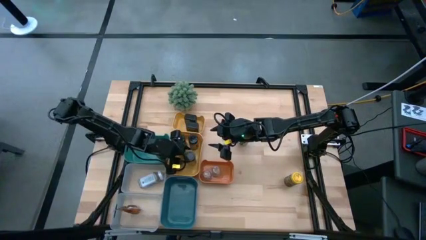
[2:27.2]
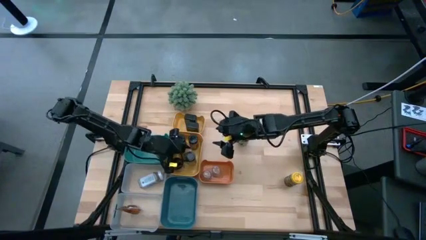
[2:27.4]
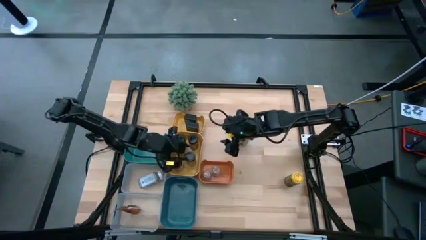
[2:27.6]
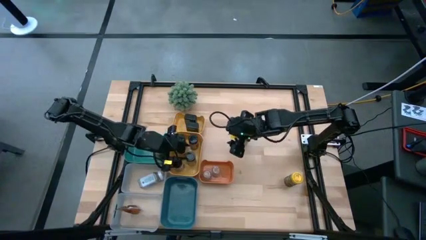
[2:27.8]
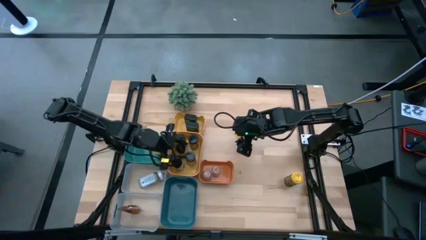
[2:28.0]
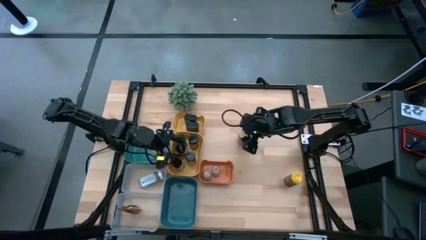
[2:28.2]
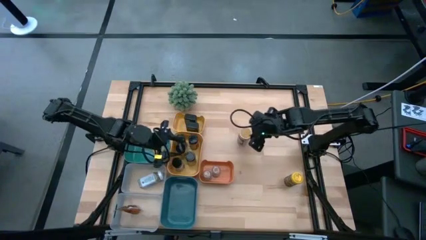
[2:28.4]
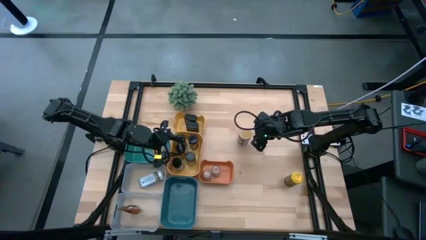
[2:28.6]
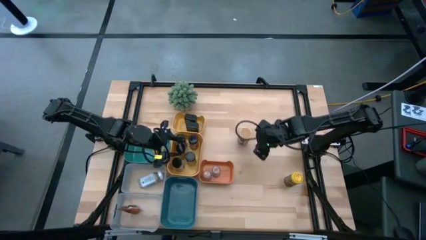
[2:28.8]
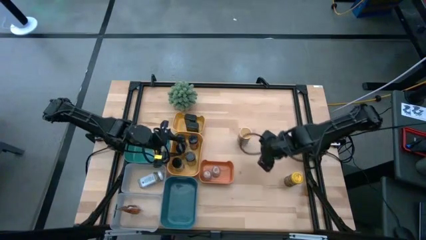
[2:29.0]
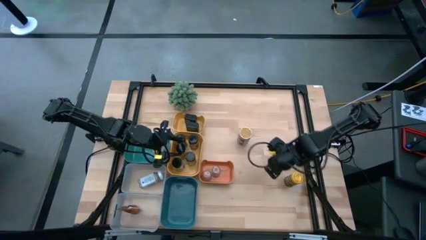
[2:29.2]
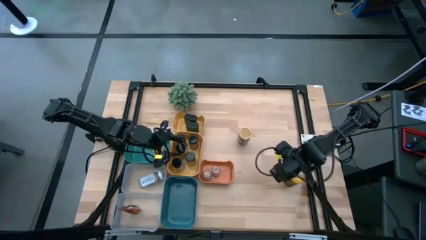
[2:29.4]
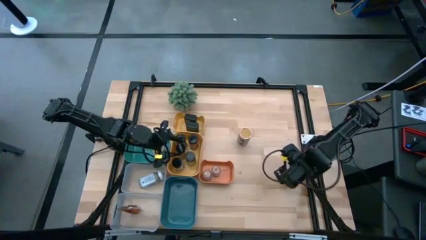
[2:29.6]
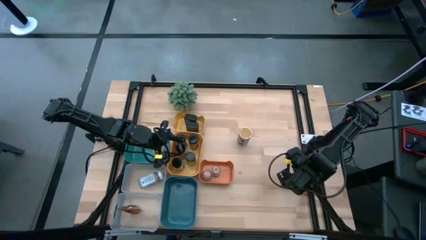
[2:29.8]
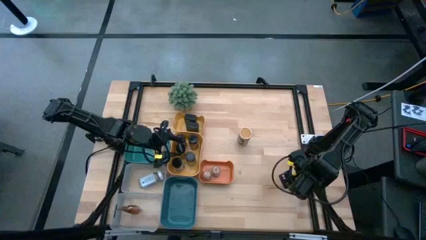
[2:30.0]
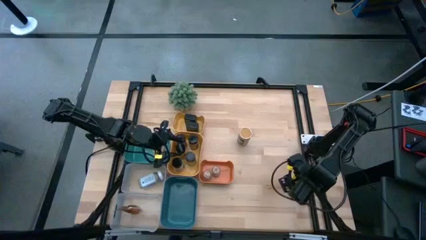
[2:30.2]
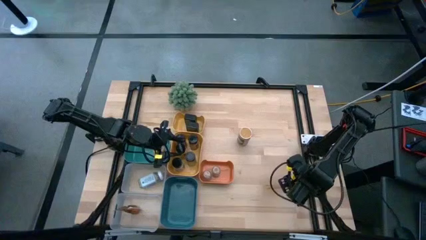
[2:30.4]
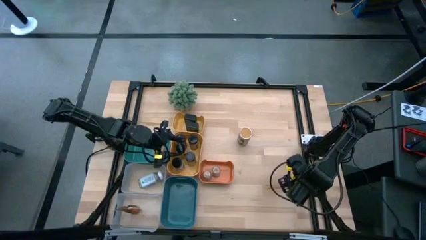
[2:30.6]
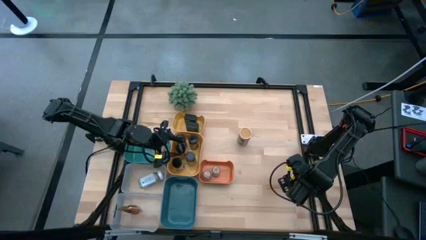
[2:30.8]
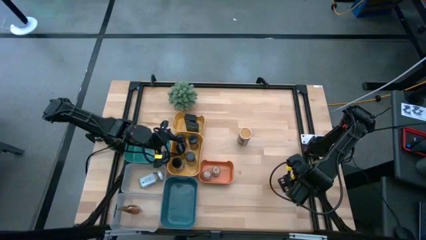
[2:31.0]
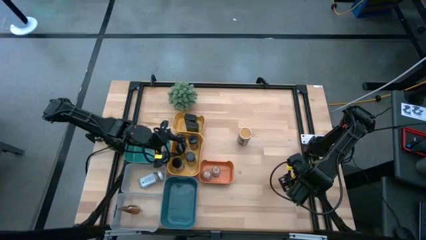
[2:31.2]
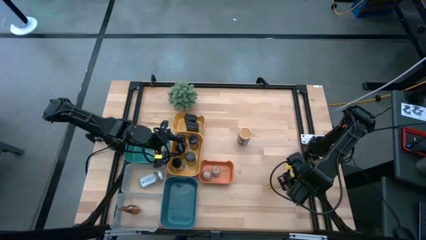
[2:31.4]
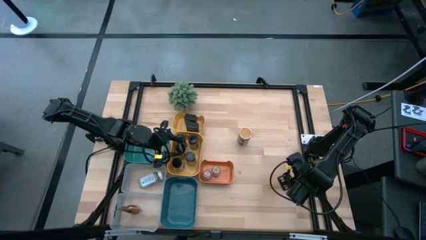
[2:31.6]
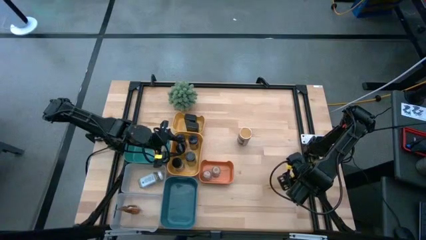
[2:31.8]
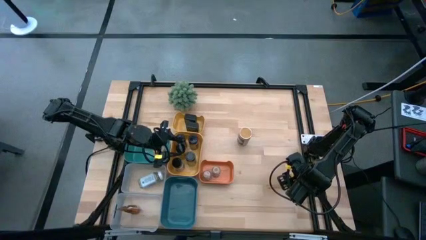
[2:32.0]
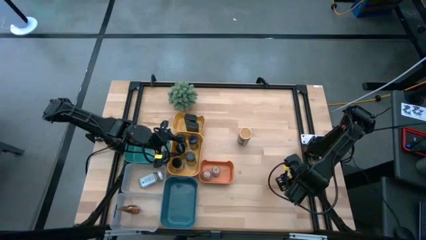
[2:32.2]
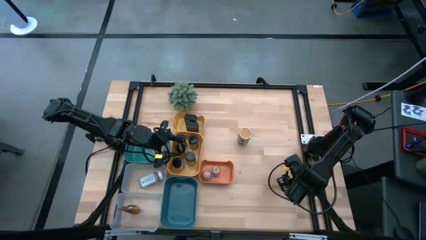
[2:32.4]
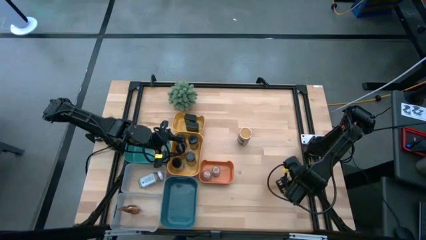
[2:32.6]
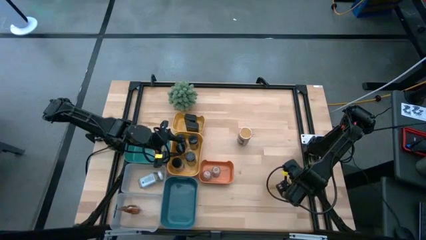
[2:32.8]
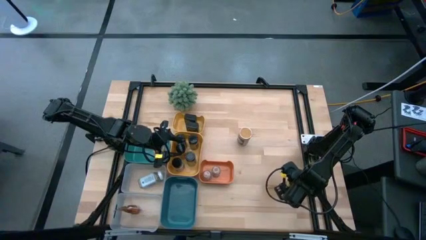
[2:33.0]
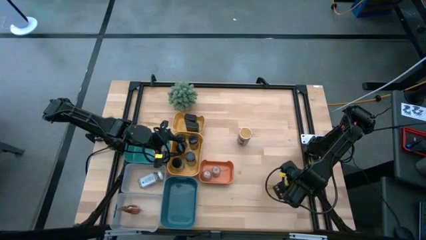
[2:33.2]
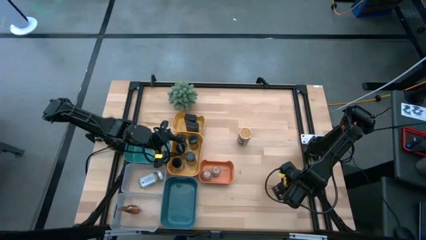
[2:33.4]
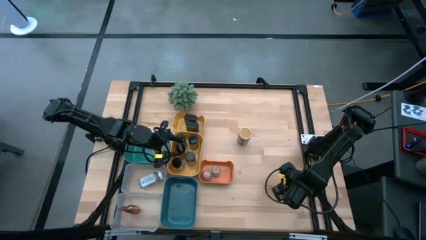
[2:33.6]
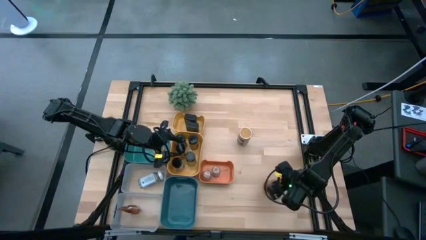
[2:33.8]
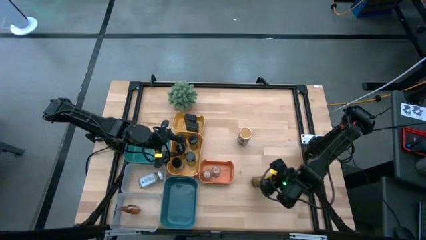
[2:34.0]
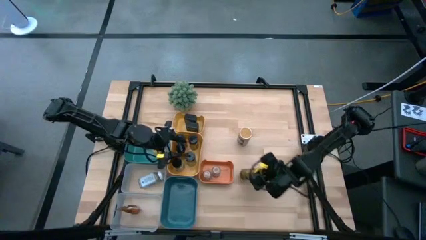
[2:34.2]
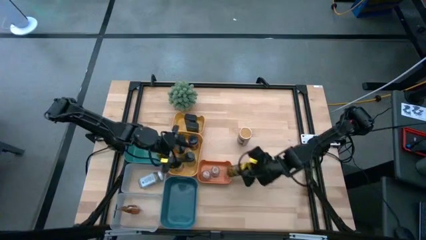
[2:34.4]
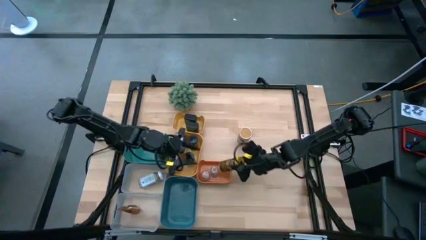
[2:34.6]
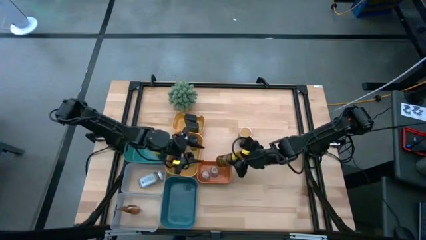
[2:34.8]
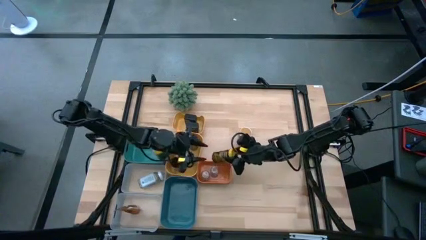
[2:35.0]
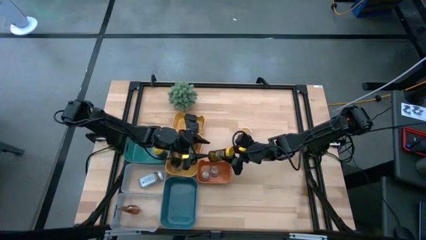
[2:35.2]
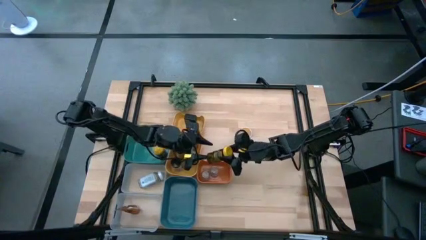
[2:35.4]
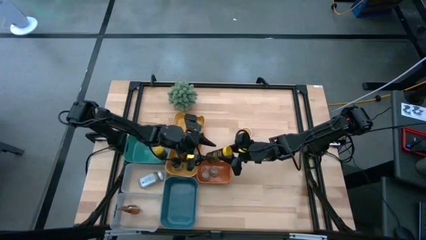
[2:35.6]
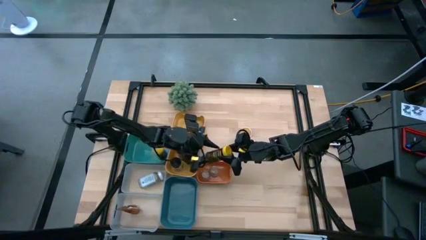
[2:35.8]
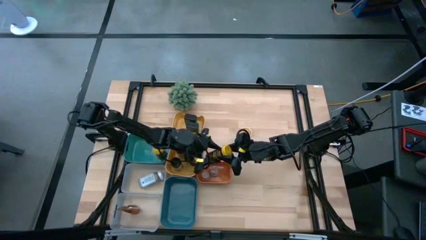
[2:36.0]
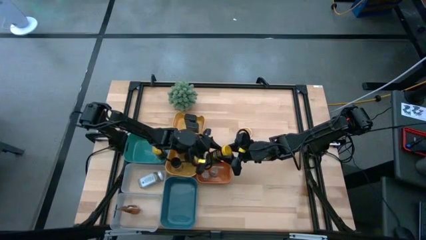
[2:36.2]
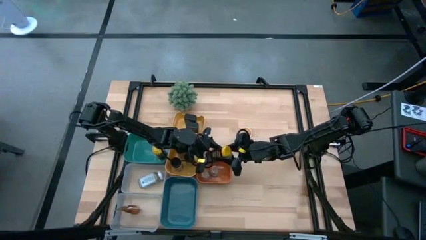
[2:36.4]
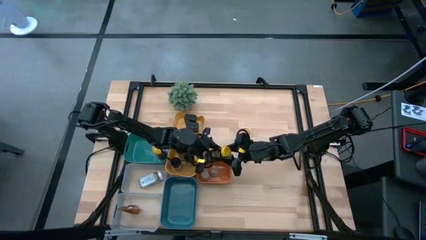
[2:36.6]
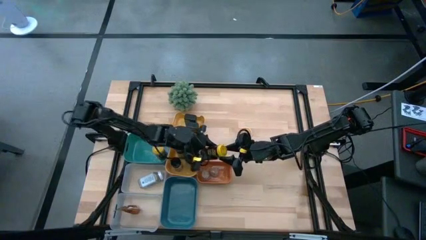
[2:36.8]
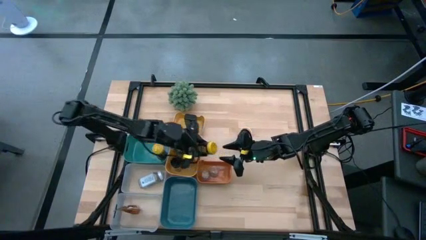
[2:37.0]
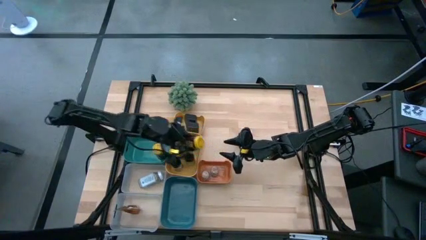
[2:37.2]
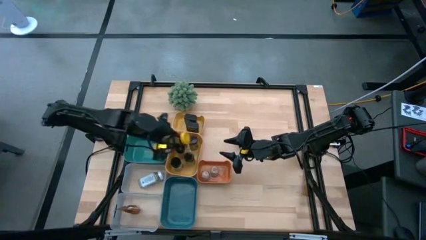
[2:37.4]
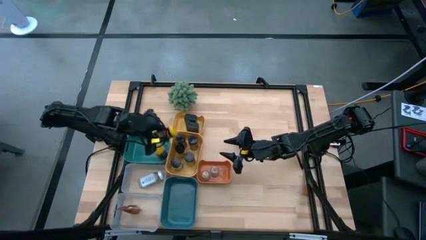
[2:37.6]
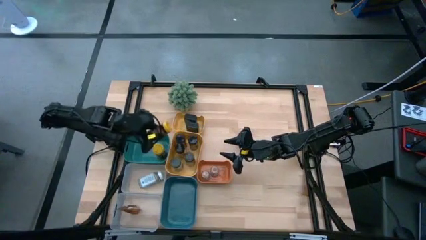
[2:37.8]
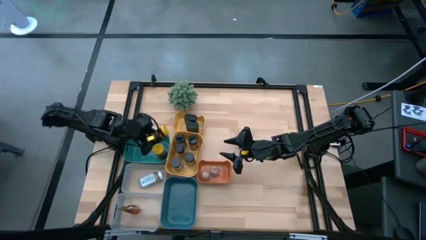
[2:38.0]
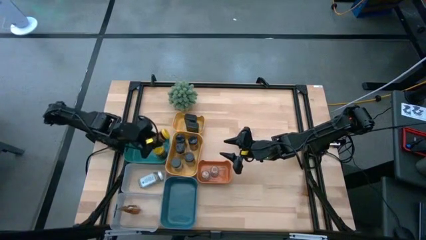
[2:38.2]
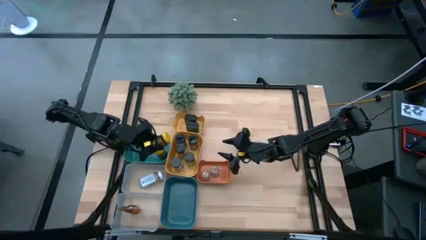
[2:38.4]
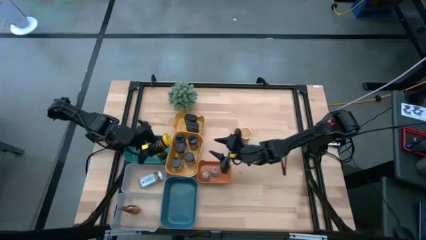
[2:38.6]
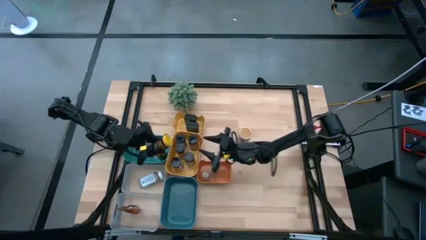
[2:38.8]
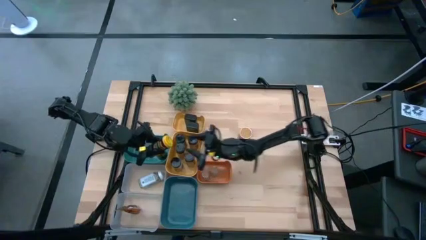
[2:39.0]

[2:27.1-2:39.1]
Task: Sort spices by type
Put the yellow seasoning bottle into the green bin
